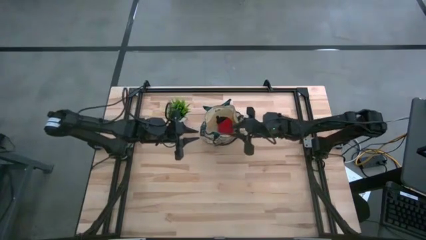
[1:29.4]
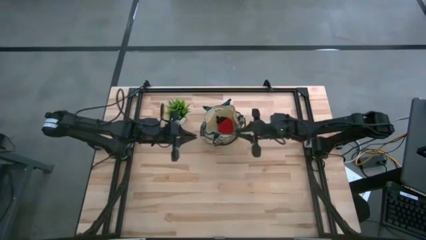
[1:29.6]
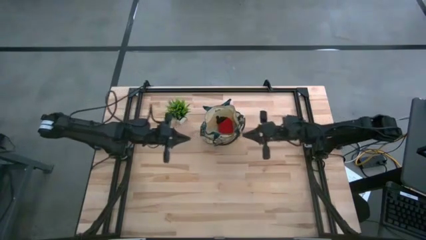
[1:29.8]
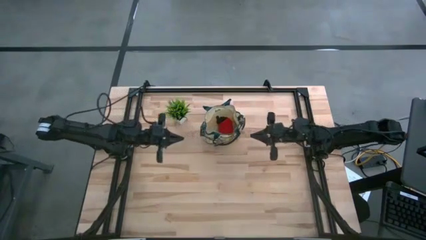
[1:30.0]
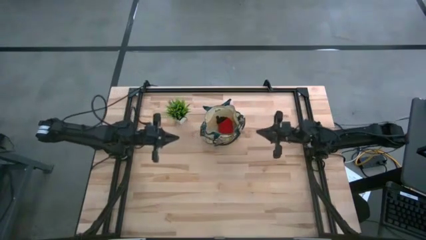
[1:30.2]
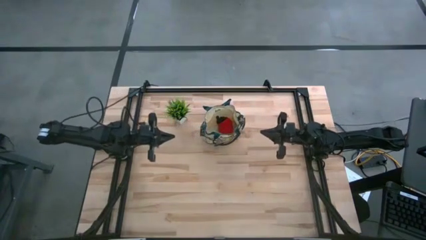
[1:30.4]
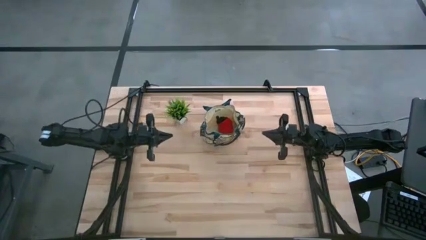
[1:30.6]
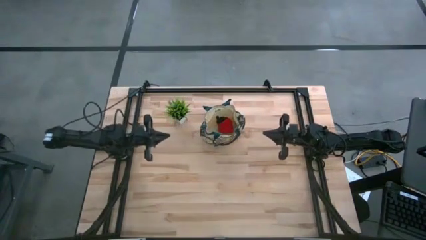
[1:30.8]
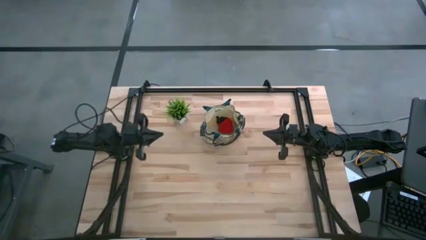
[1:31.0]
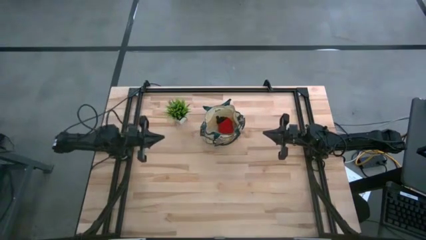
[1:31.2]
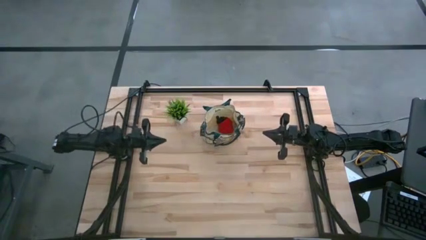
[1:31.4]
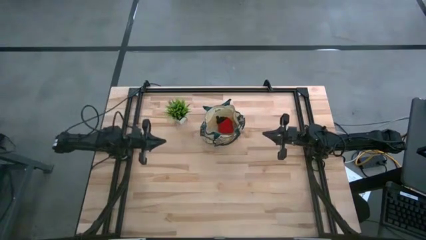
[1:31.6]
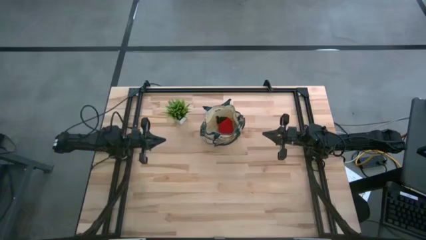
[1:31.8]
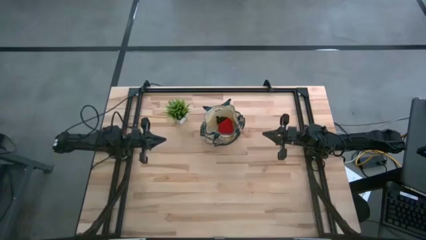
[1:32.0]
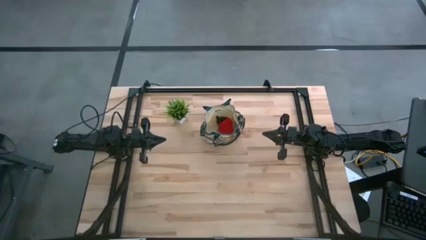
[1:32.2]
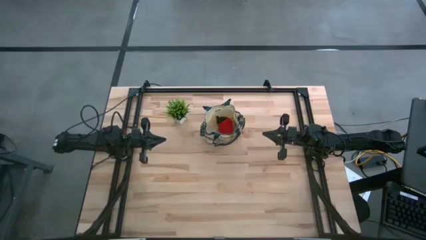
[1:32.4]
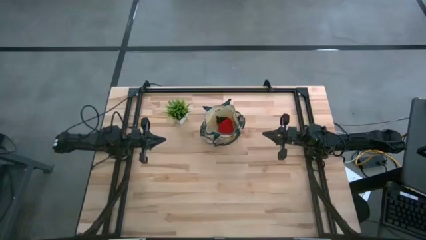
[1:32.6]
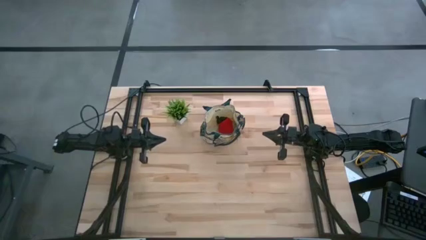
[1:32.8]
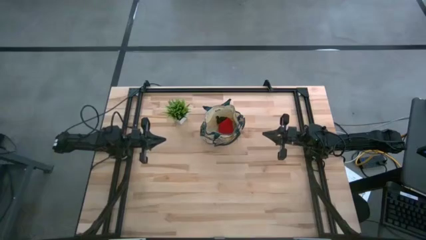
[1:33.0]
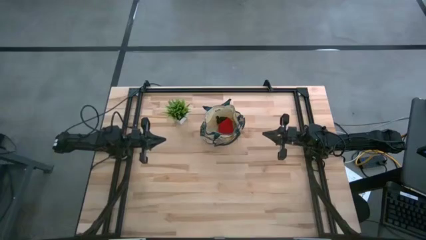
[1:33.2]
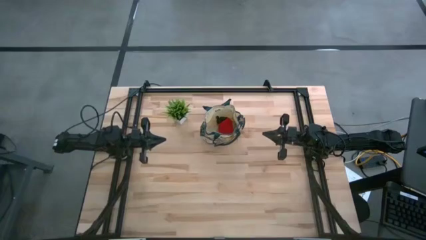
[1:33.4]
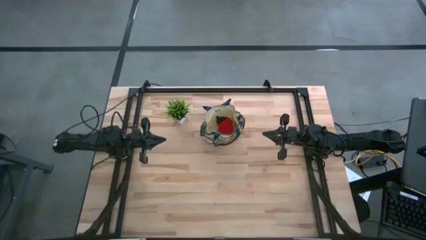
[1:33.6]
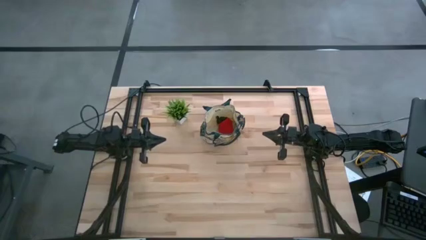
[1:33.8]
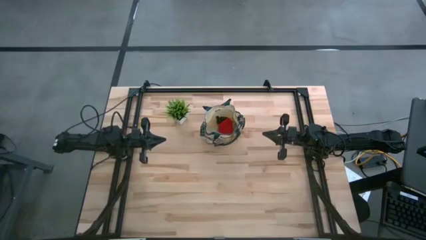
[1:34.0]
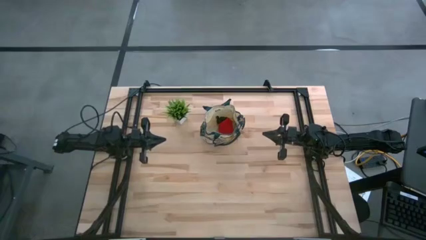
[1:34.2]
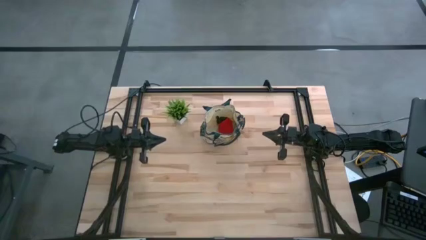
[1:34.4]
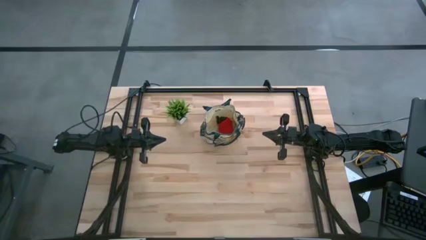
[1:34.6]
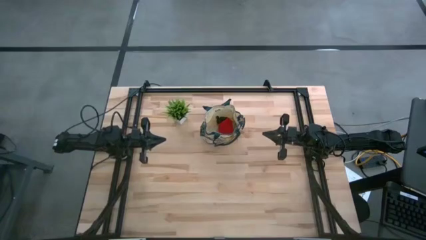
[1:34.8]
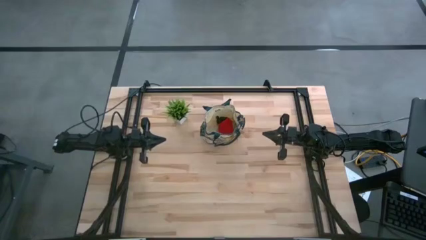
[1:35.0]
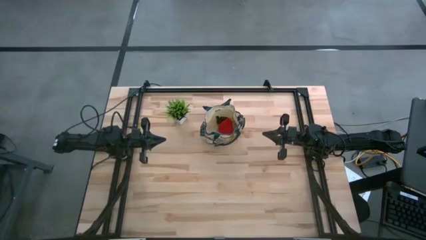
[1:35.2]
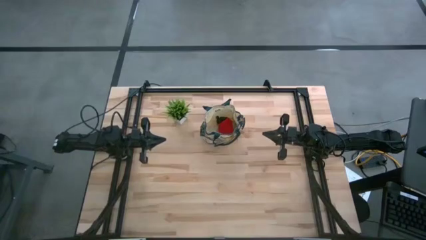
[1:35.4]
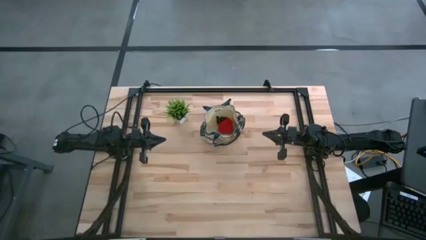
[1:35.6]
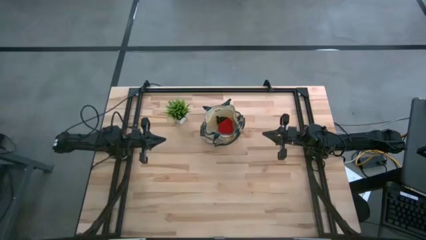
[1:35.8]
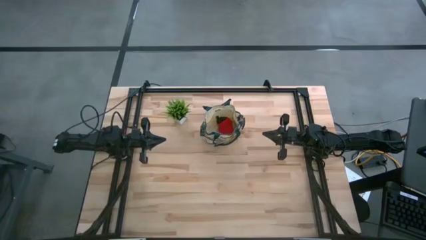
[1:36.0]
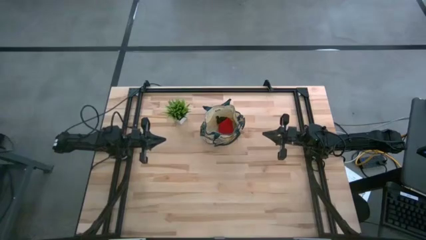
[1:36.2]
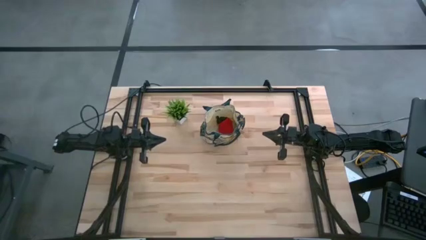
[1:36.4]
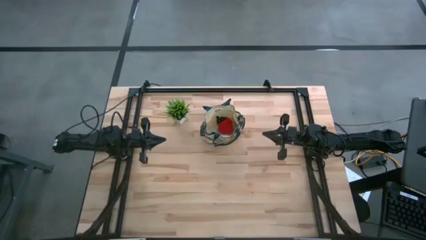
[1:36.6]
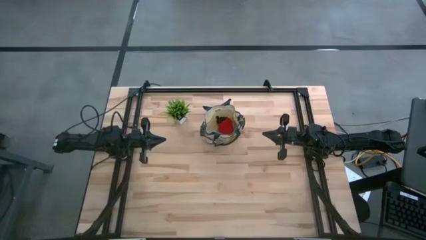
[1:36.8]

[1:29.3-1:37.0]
Task: Pick & Place Garden tools in Gardening bag
Return to Home Position

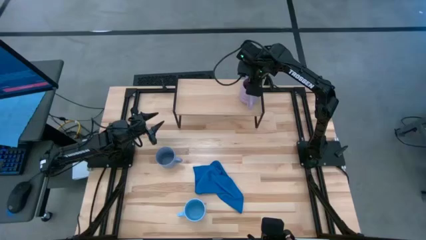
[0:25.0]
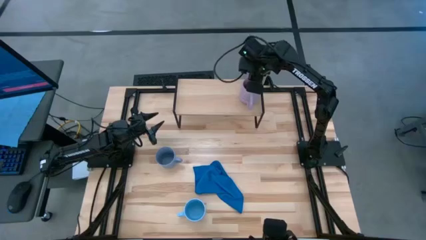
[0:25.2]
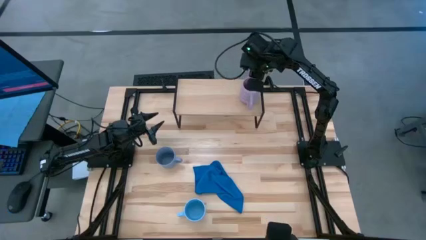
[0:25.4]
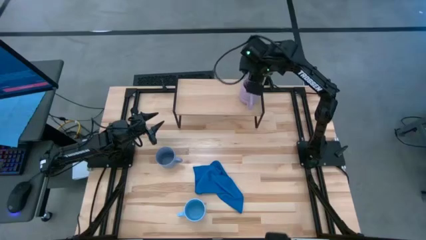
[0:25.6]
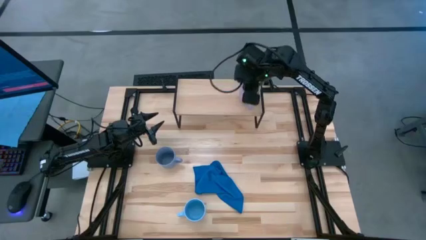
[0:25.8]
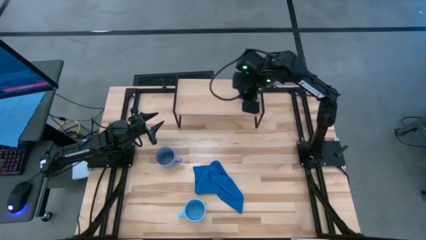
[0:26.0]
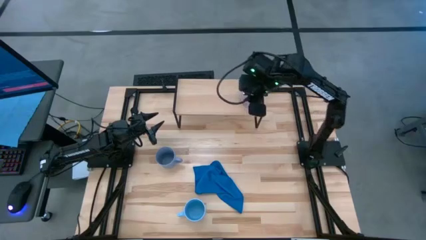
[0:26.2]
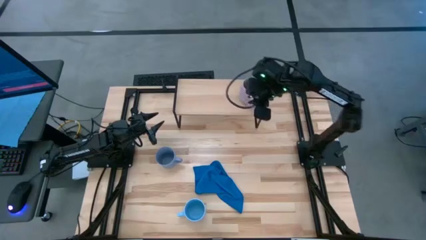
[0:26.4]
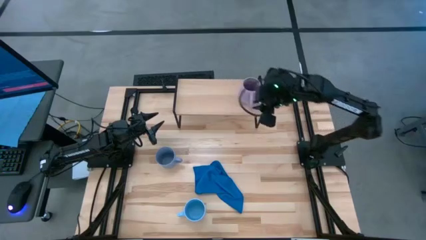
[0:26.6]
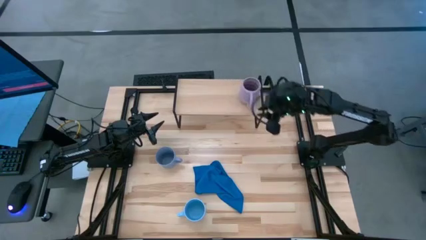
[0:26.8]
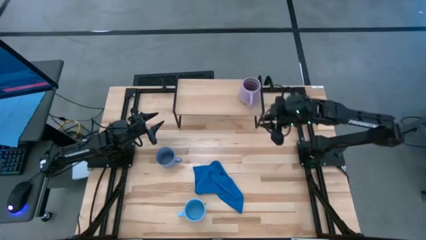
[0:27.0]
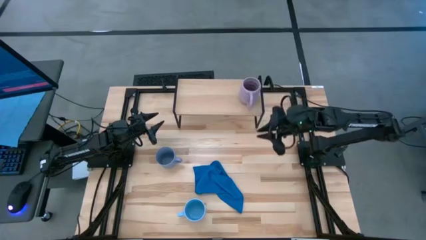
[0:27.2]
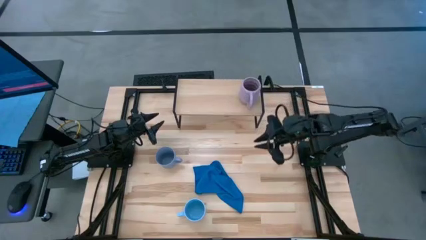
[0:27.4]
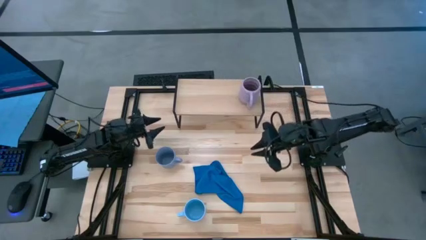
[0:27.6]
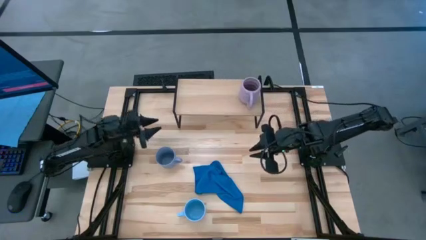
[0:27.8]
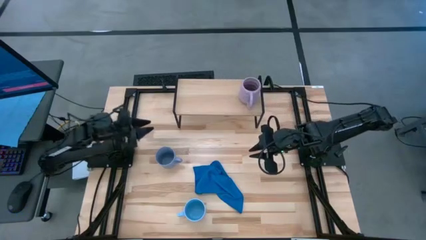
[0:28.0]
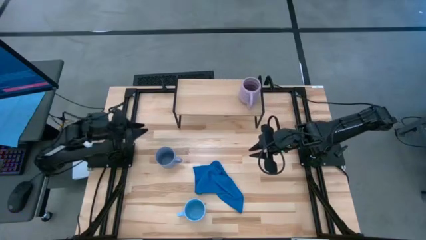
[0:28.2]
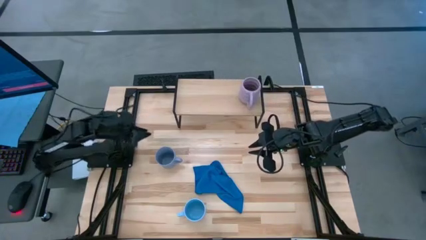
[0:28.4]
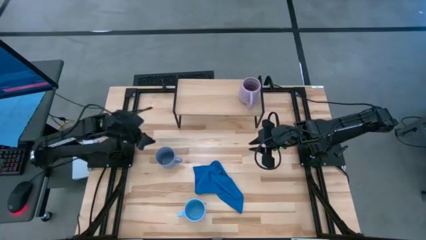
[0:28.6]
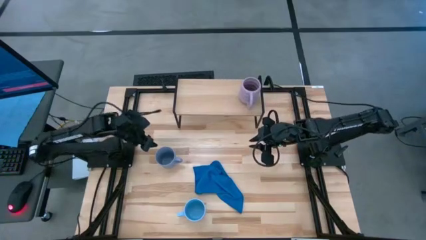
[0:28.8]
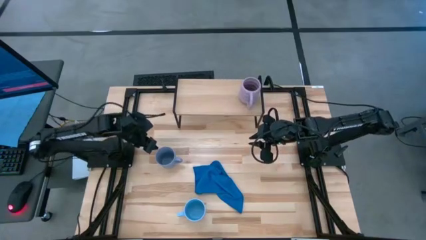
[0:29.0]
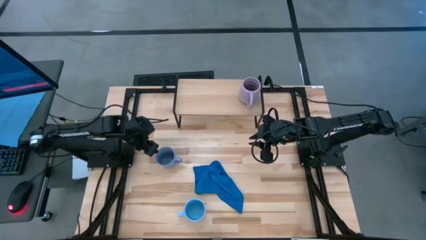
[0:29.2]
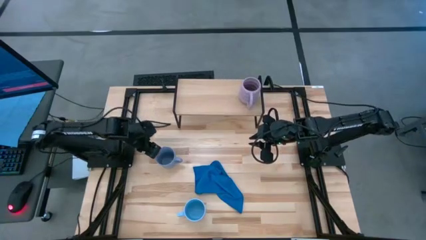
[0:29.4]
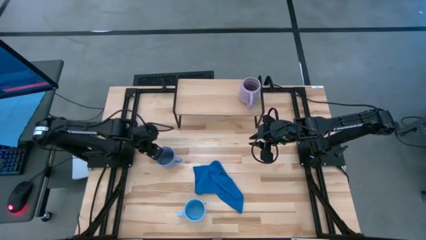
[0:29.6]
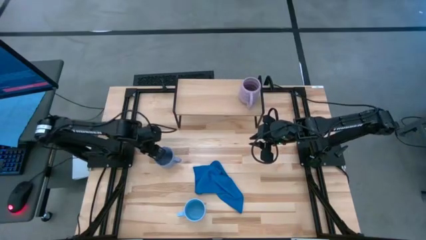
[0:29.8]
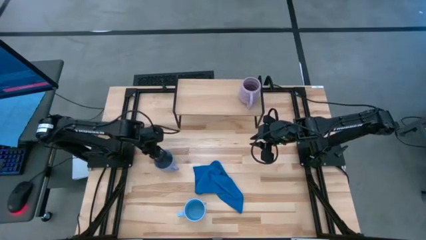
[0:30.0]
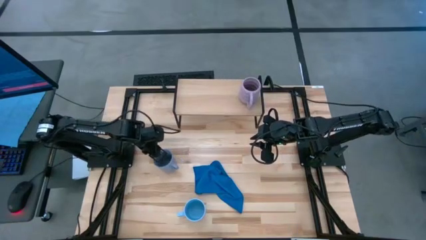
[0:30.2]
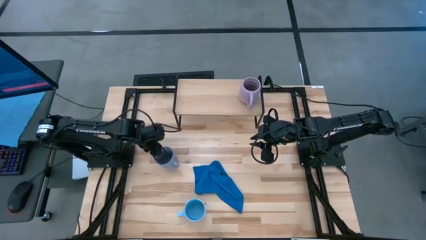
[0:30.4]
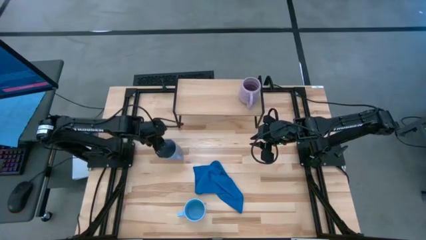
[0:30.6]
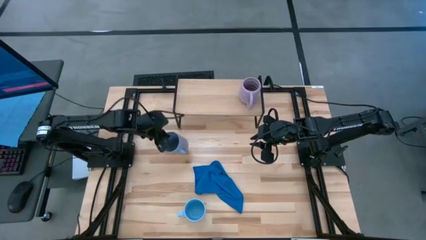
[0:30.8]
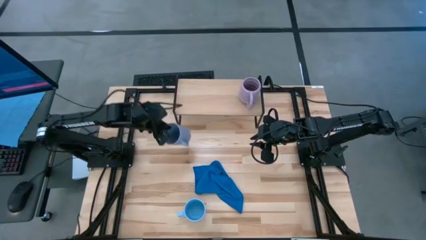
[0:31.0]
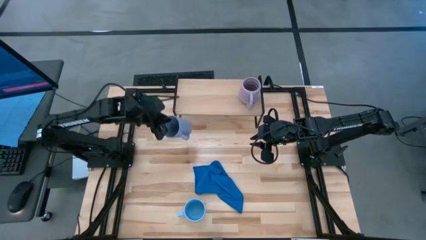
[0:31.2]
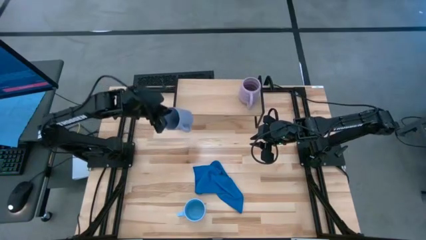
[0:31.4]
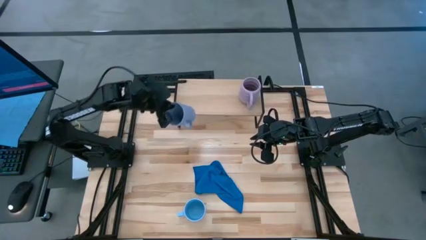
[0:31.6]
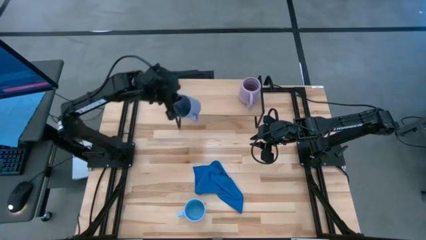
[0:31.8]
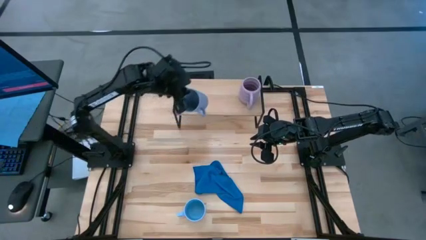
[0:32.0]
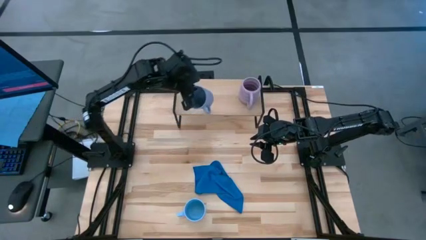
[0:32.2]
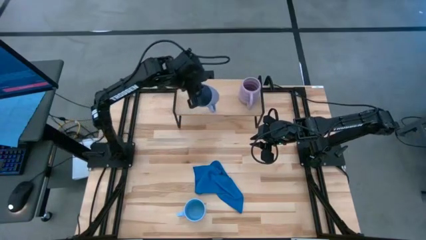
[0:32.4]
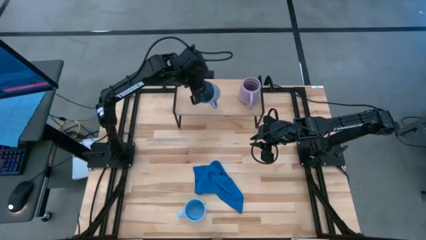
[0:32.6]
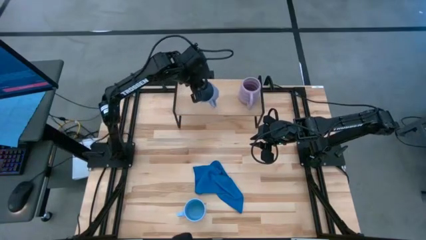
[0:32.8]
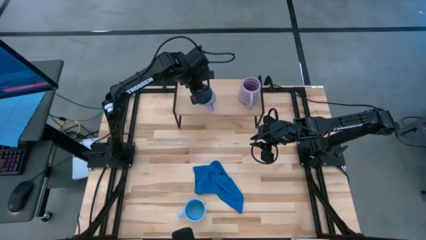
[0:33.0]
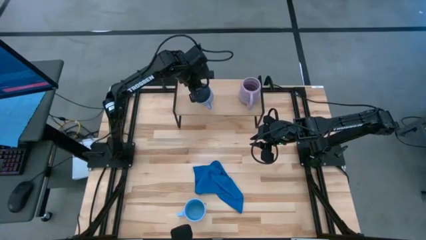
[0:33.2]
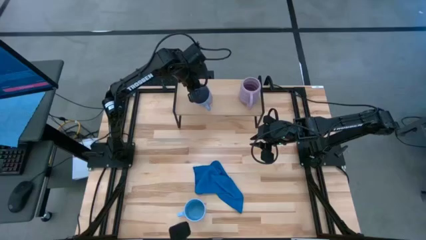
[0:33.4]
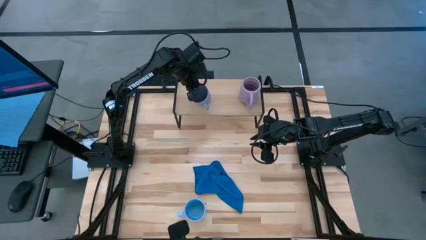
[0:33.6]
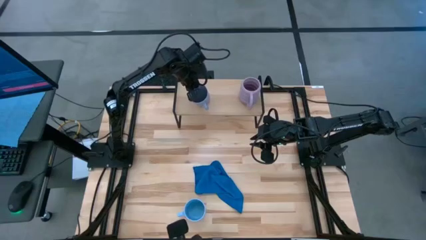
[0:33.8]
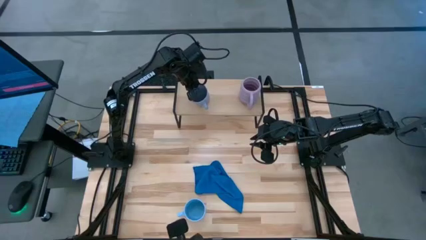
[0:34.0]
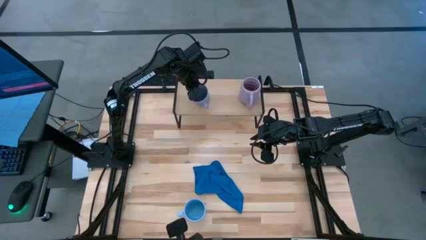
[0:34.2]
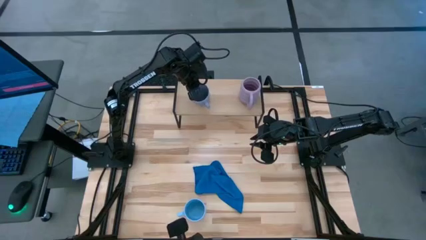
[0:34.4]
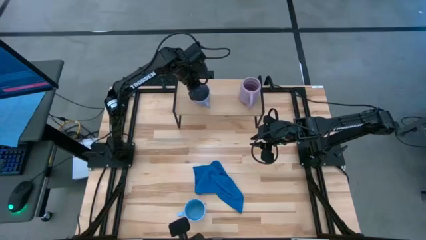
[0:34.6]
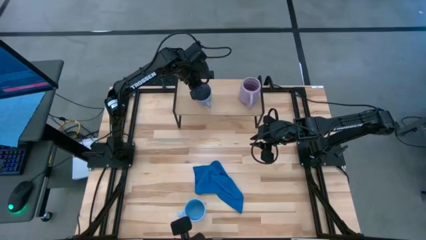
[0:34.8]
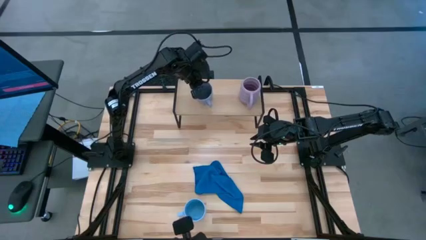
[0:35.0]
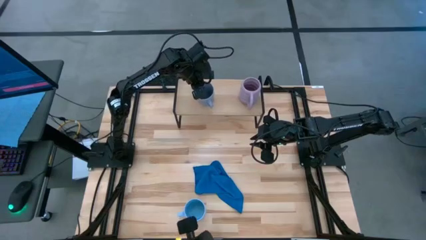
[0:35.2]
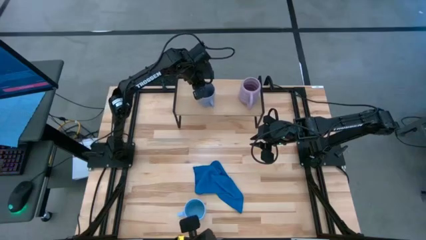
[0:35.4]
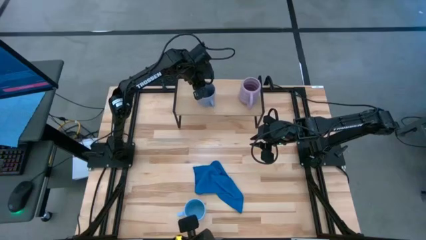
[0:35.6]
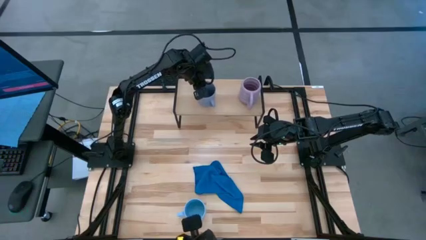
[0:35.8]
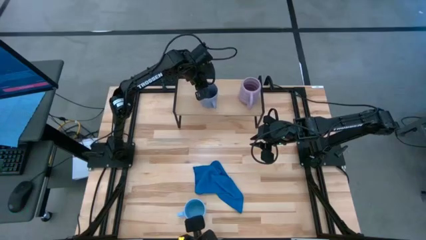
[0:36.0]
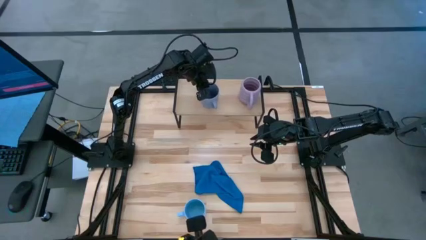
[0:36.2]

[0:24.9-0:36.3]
Task: Stack small to large cups/mugs on shelf
Put the blue mug on the shelf
